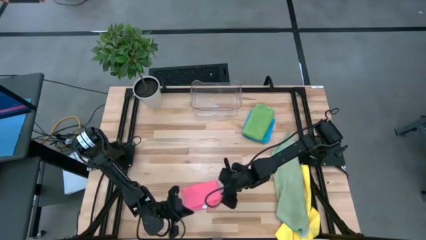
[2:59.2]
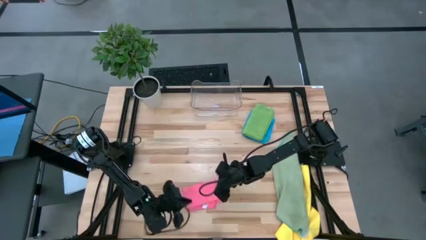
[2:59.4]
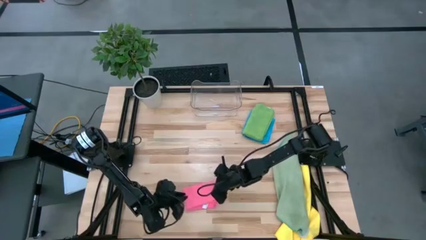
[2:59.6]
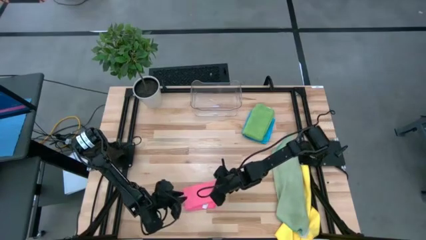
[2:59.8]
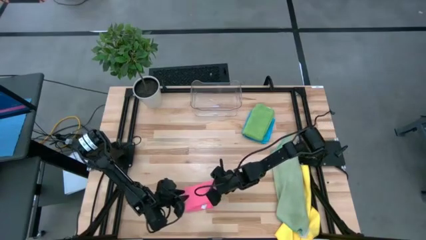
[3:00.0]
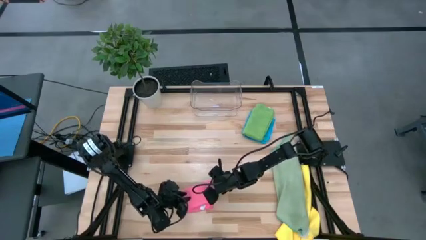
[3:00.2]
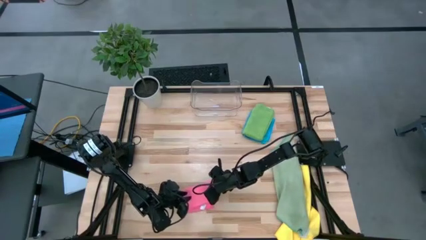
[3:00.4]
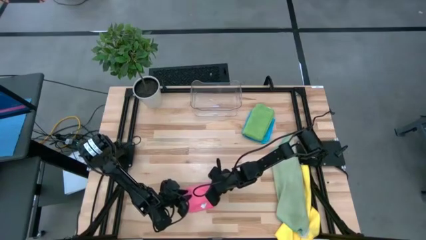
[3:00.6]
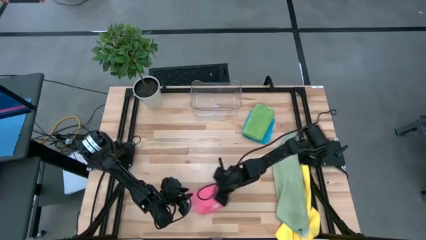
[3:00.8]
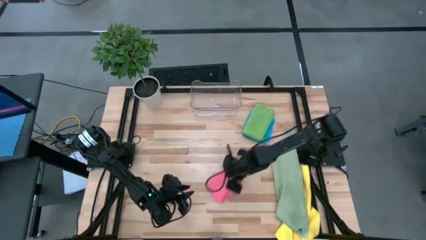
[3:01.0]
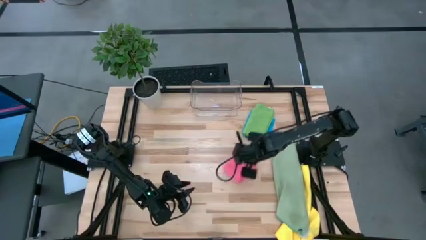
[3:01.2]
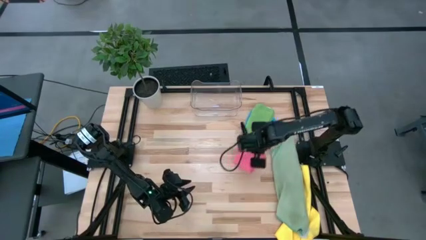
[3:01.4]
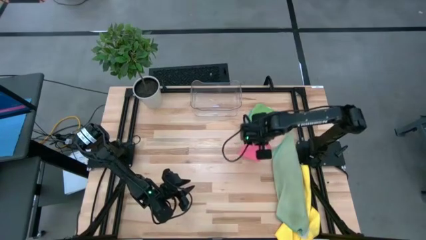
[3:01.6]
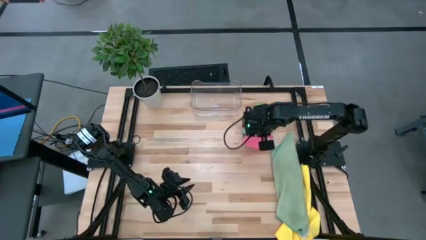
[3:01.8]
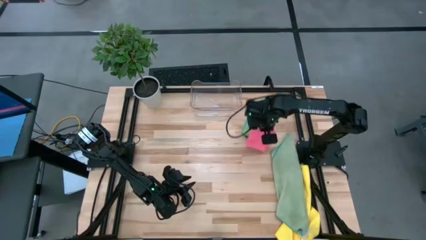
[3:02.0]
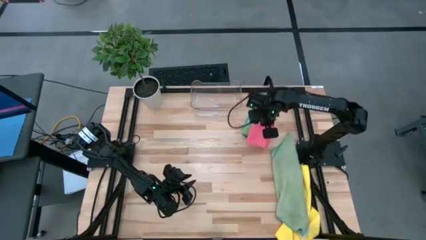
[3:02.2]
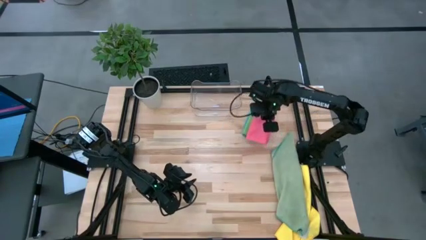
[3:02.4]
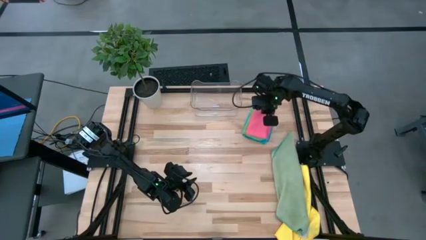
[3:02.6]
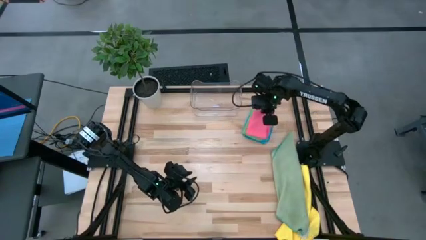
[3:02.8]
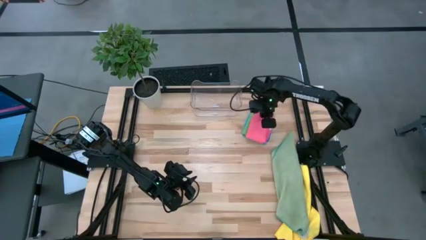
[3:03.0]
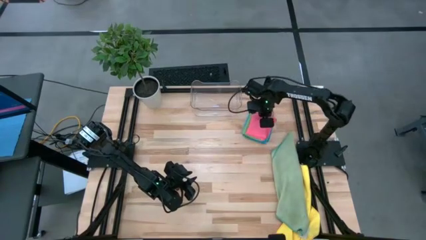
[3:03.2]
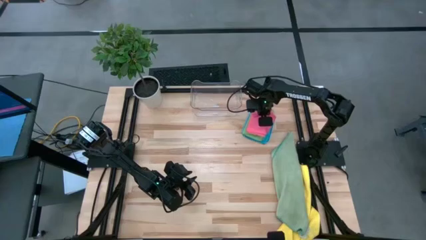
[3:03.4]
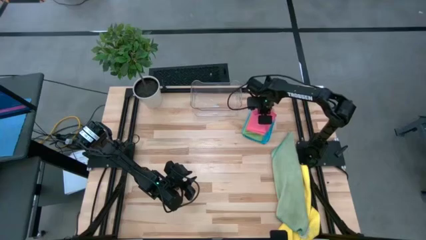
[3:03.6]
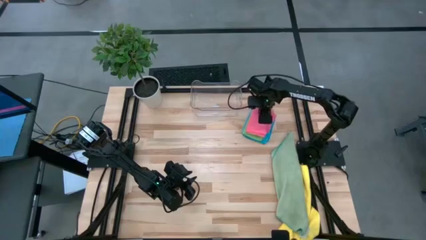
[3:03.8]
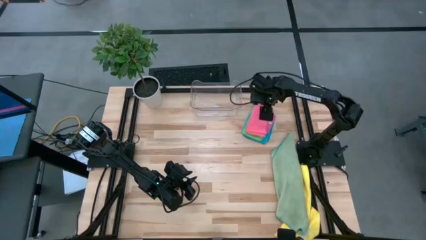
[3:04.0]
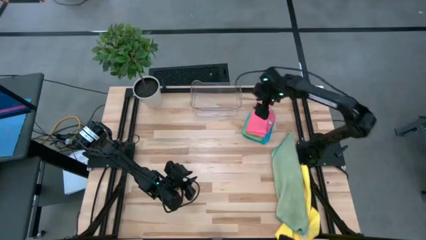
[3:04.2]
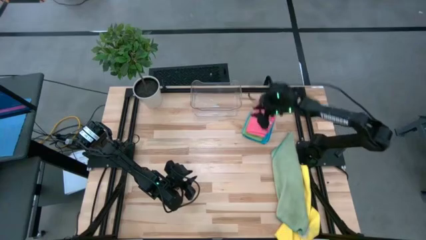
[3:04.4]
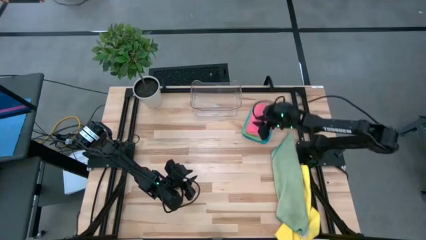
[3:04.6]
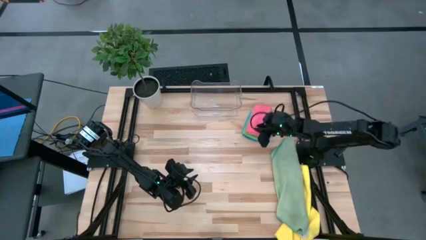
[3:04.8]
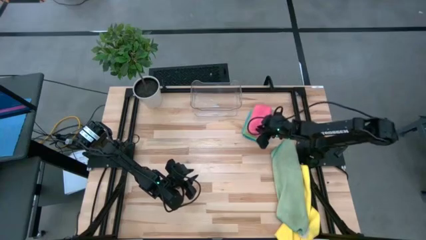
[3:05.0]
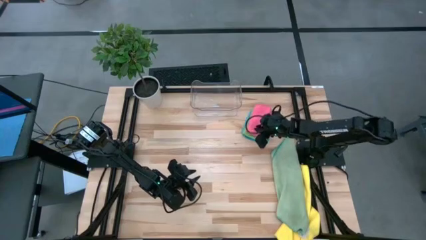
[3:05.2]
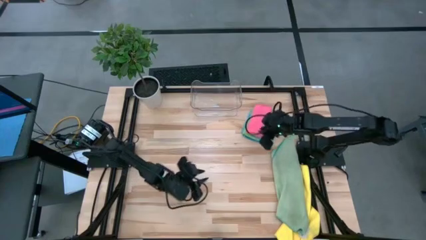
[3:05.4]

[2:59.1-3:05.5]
Task: Fold microfiber towels
Stack the pink microfiber towel on top of the green microfiber towel

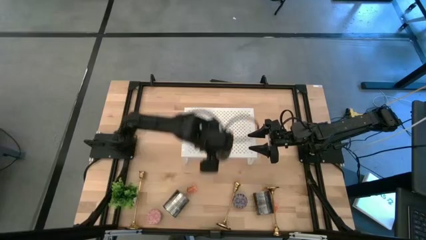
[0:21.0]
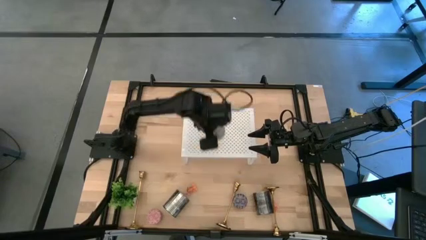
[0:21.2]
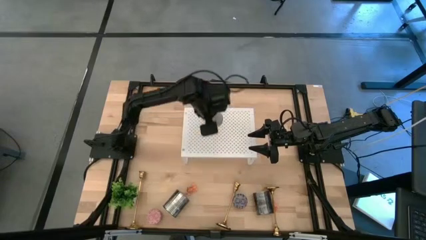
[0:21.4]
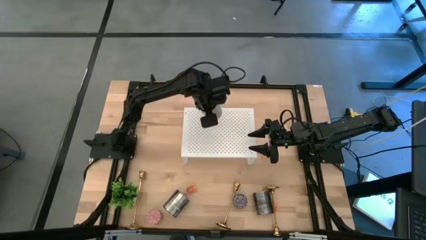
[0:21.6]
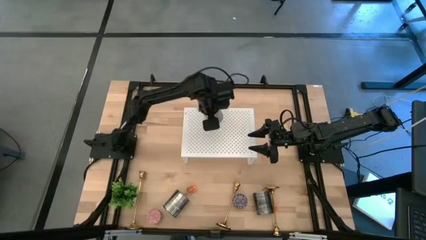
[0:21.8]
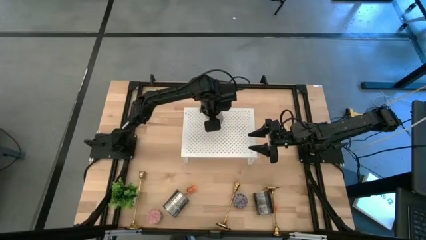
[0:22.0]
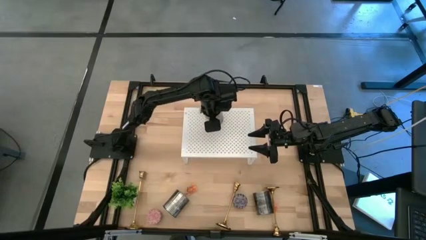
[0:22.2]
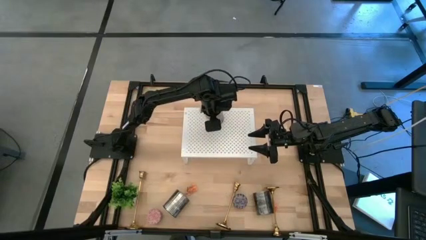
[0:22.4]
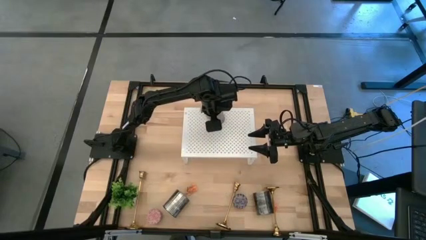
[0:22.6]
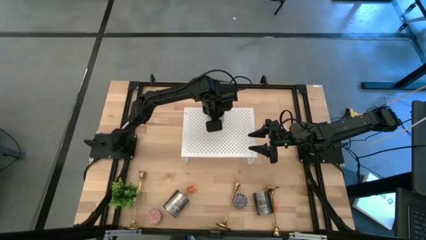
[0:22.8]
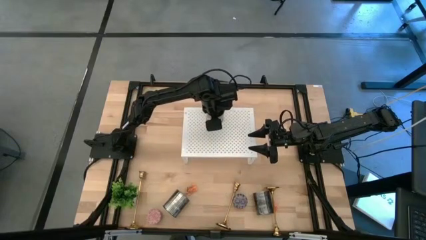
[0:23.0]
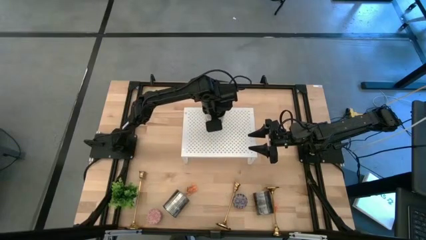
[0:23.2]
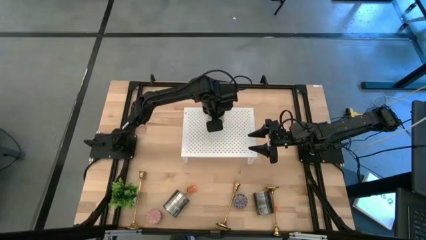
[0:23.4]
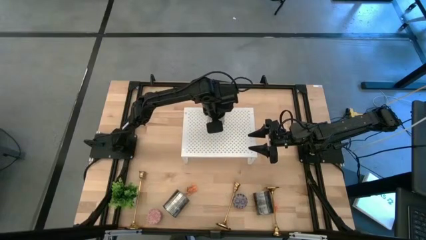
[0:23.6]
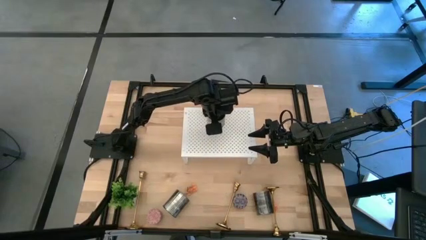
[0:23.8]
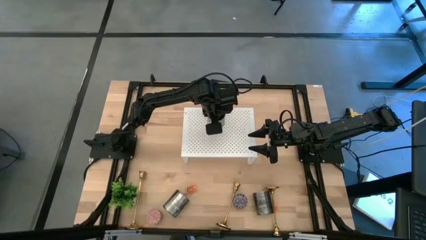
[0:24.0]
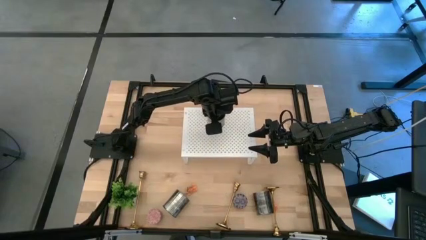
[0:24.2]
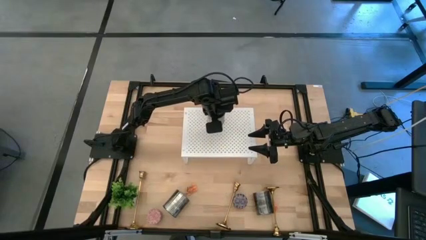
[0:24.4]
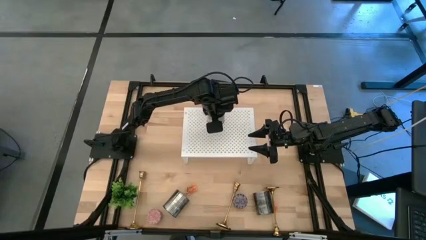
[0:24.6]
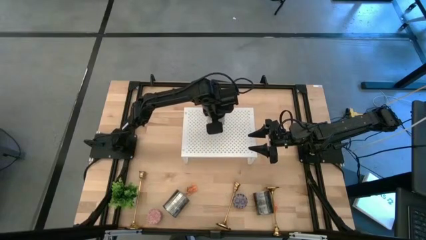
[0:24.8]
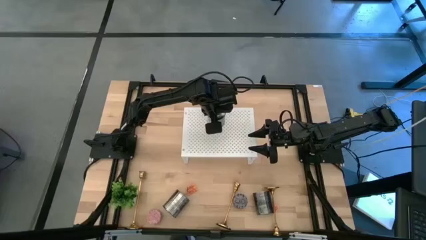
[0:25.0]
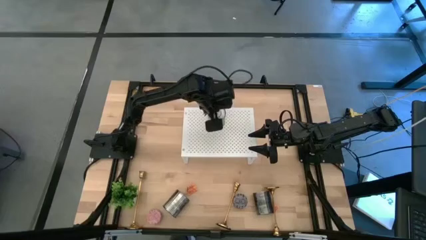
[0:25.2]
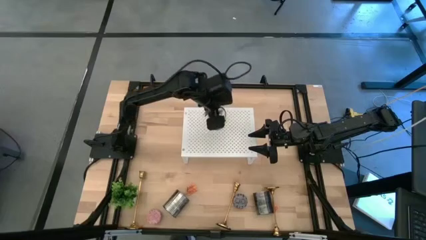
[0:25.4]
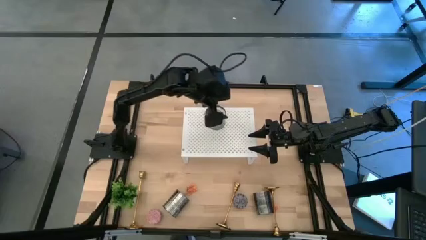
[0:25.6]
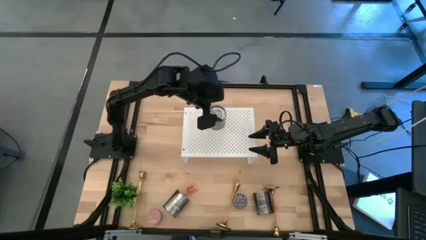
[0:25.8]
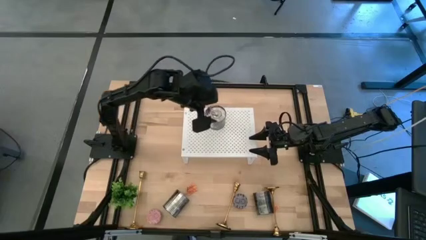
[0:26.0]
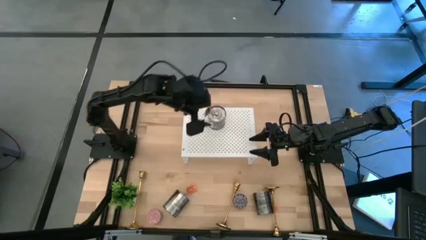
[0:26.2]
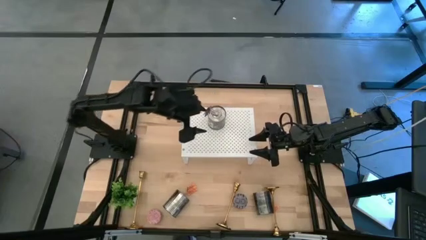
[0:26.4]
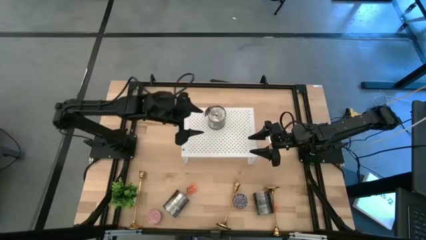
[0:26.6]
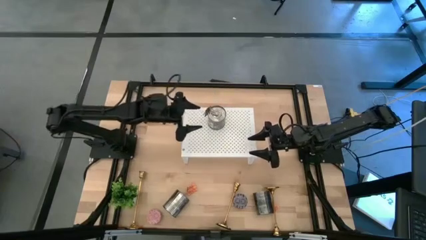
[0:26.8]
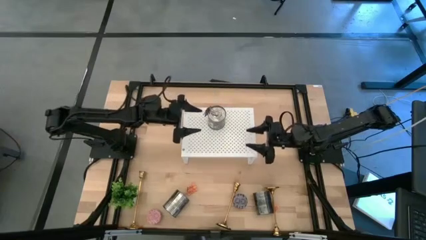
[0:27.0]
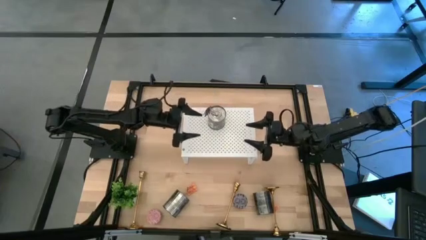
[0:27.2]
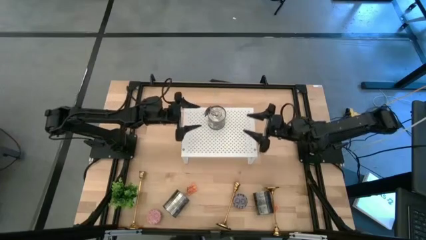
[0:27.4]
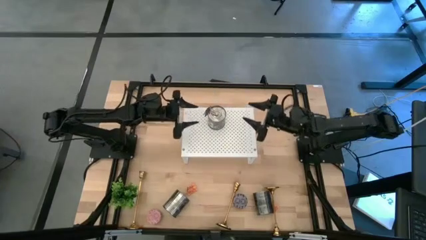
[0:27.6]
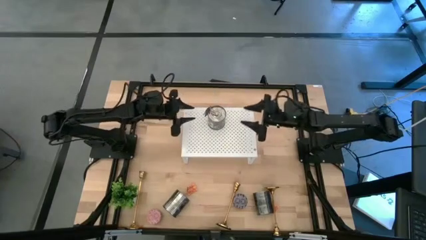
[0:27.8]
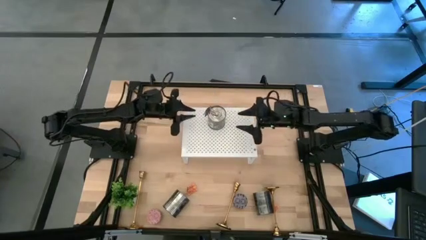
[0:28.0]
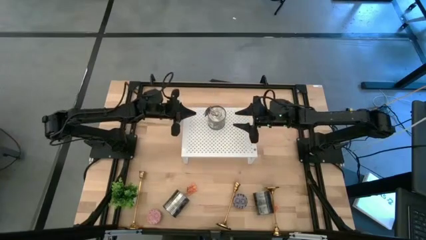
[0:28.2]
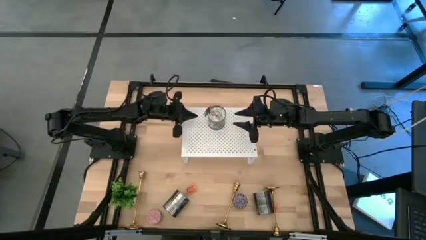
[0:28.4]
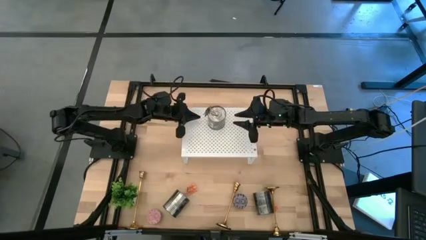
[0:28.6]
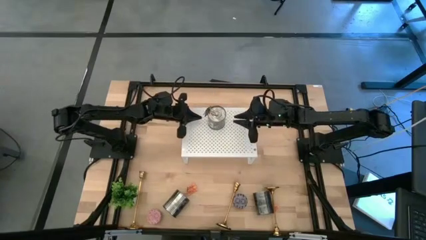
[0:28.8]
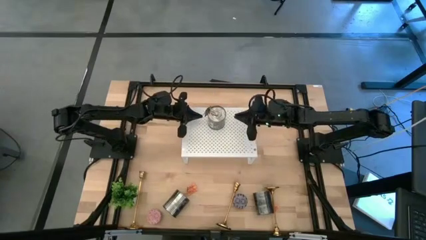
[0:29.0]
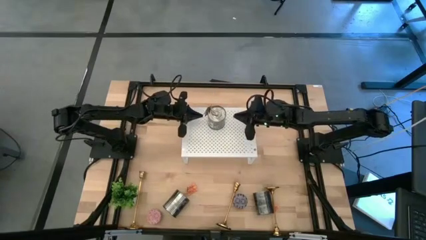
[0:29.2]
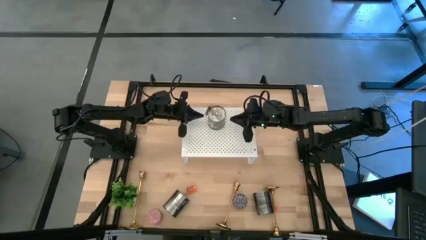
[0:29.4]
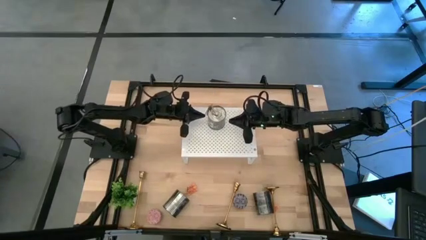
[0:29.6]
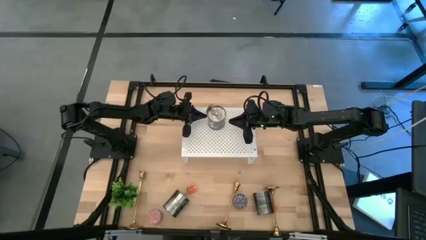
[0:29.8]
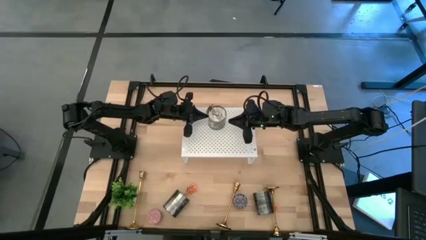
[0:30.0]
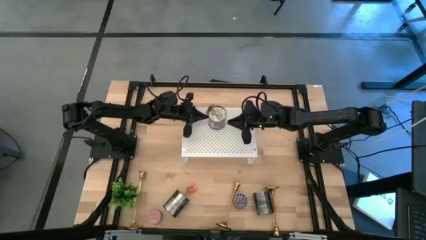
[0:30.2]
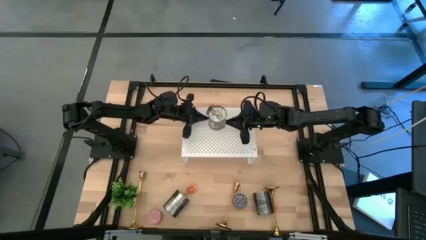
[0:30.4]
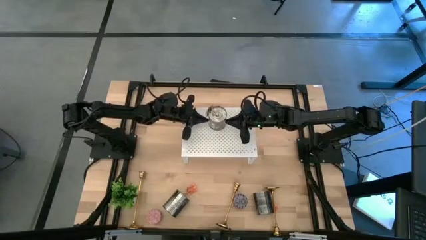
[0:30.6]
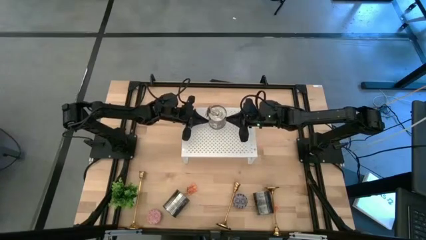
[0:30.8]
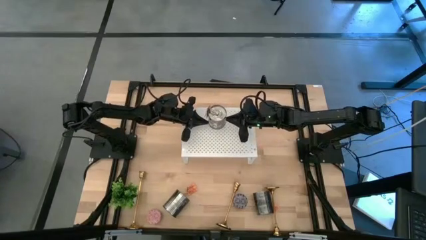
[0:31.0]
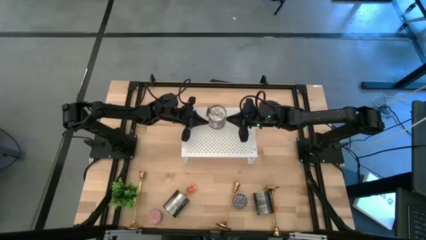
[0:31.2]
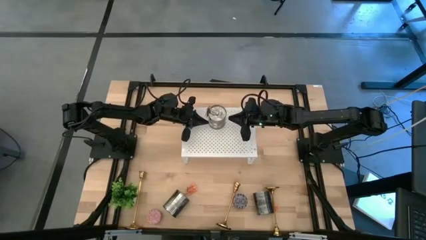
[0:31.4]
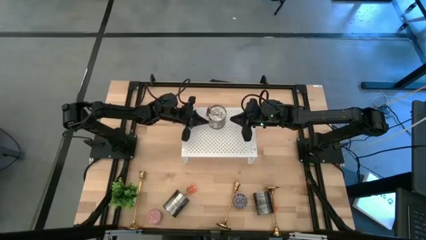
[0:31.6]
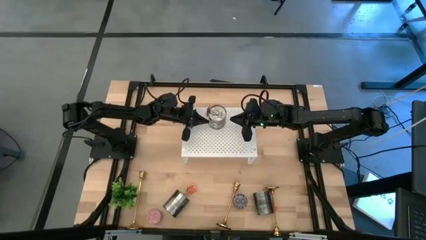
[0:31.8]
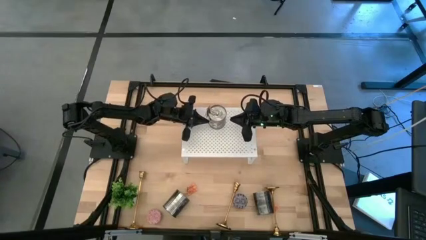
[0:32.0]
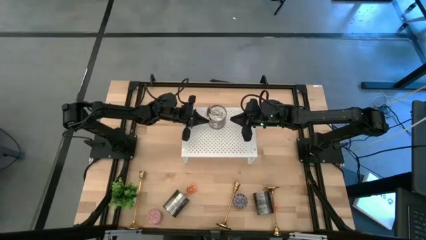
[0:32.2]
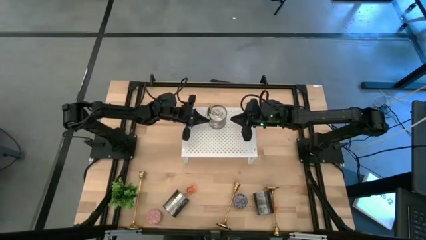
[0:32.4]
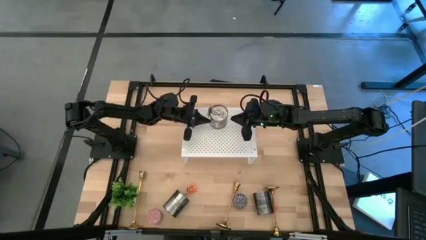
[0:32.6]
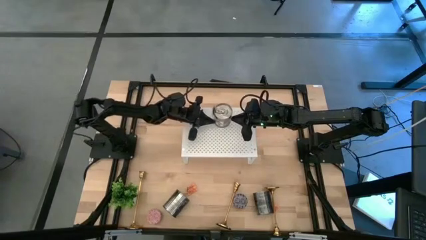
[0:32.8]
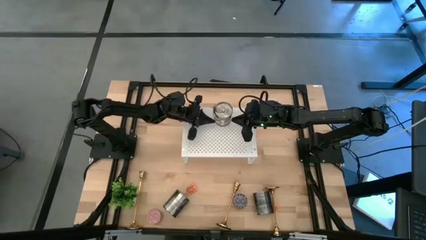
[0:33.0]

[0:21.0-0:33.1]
Task: Pick & Place candle stick holders
Put the middle big silver scented candle on the shelf
